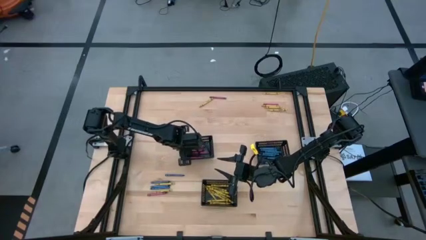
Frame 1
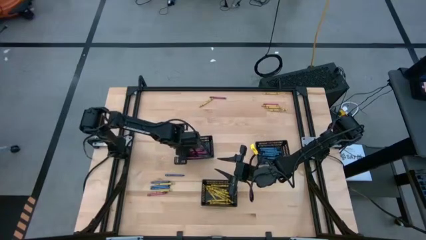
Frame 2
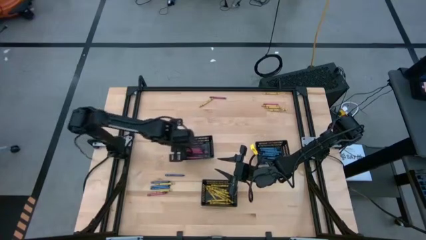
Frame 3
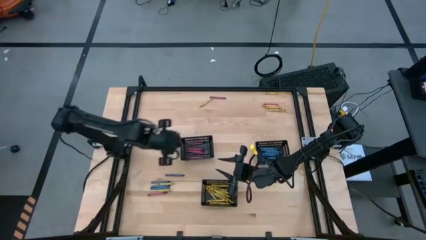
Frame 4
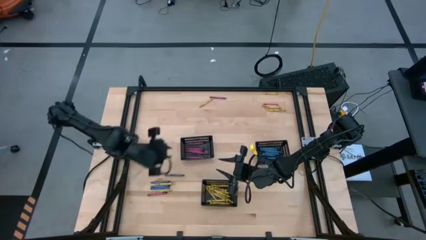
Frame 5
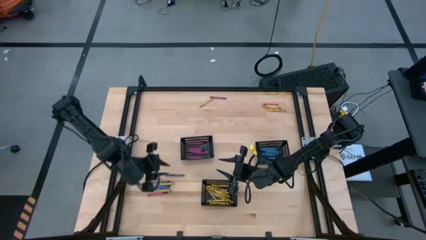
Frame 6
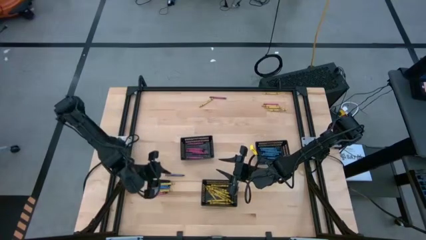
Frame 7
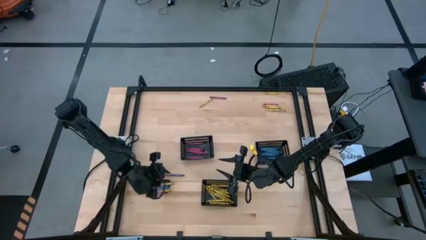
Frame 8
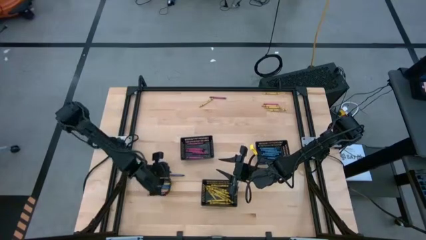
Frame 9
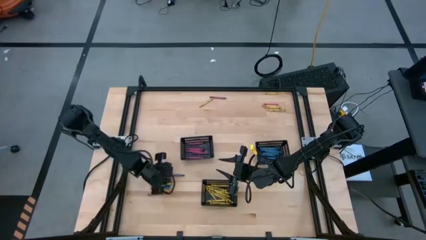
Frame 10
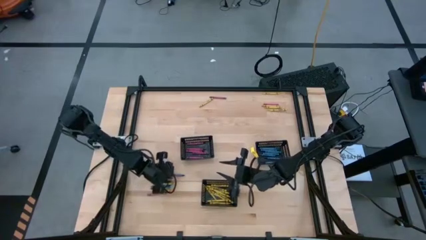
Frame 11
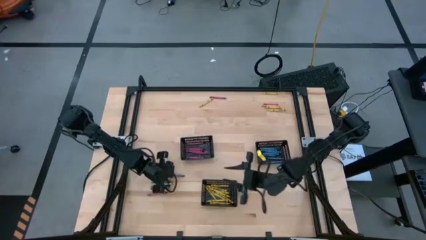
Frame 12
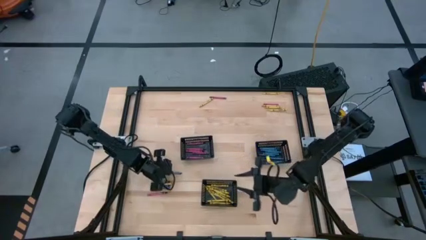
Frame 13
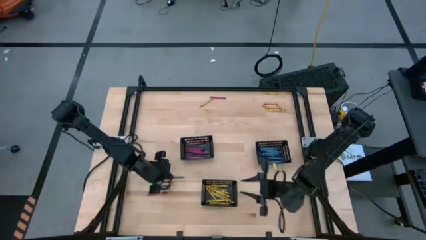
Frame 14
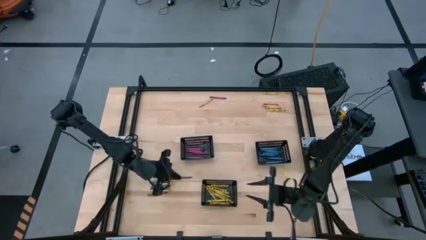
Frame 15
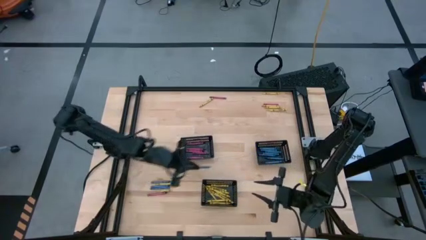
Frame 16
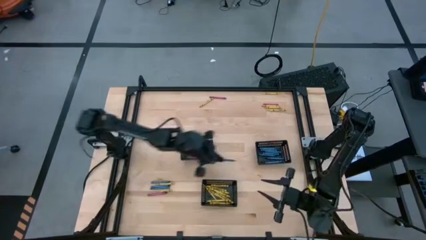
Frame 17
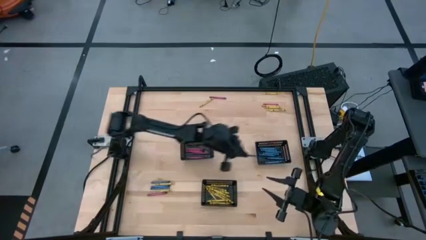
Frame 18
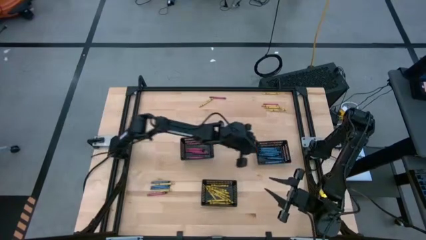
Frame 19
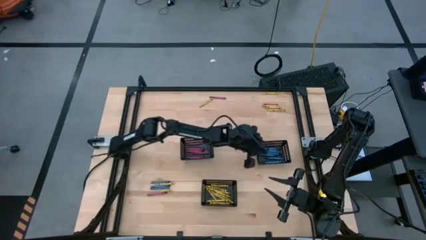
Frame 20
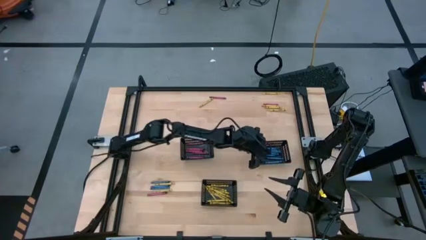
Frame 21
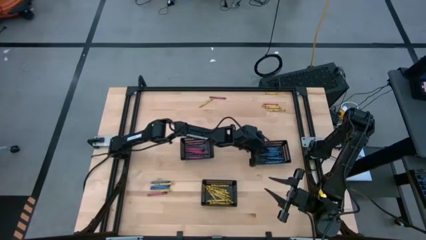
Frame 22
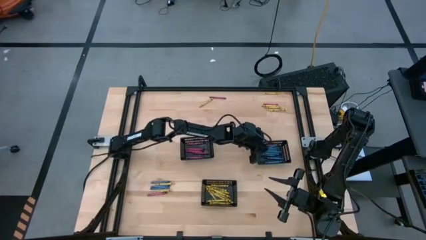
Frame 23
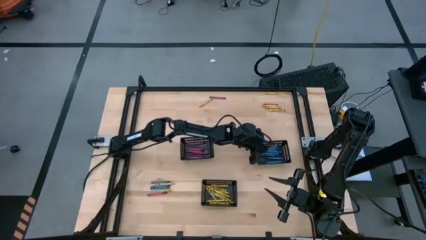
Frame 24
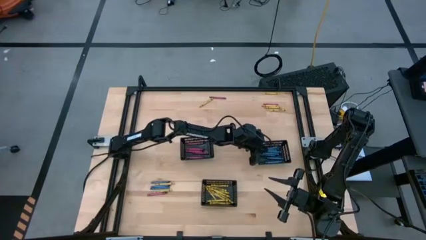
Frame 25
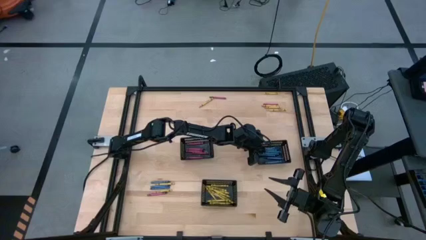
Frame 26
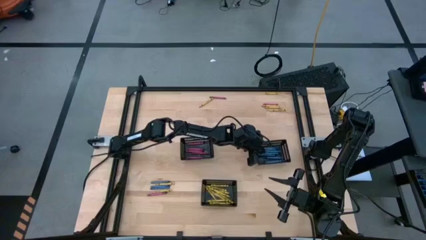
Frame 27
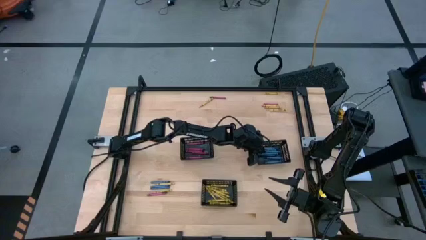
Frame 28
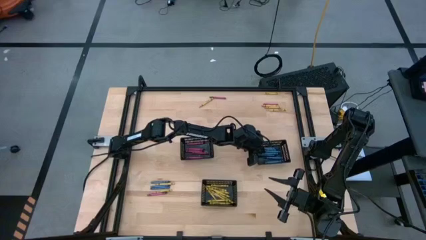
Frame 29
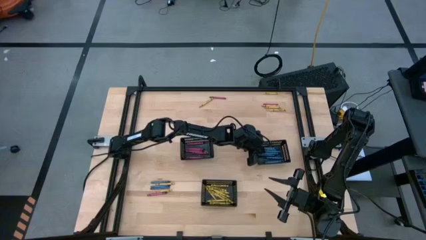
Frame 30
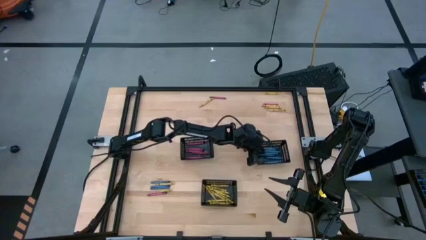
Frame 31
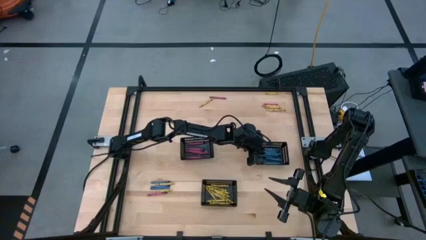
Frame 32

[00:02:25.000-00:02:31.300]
Task: Sort crayons
Put the blue crayon into the right black bin

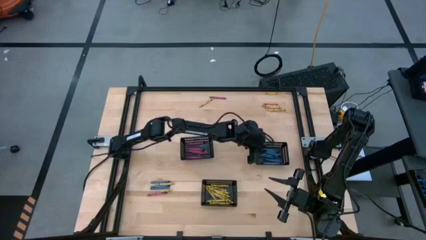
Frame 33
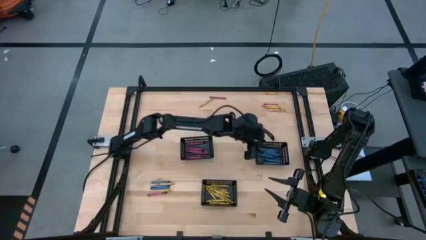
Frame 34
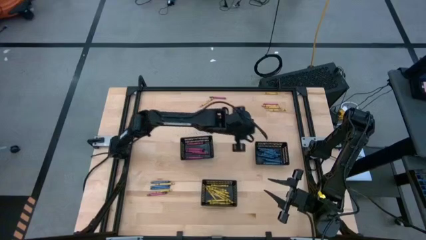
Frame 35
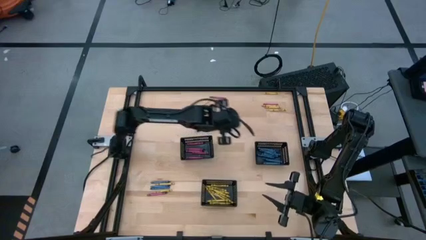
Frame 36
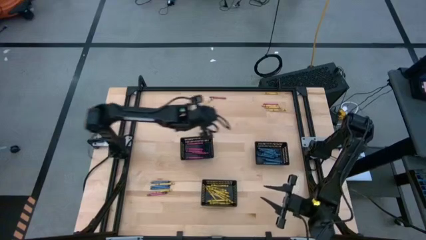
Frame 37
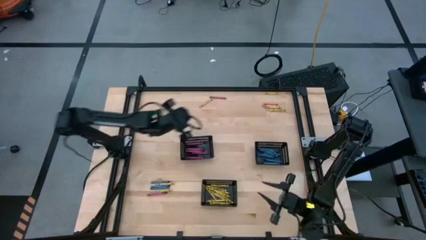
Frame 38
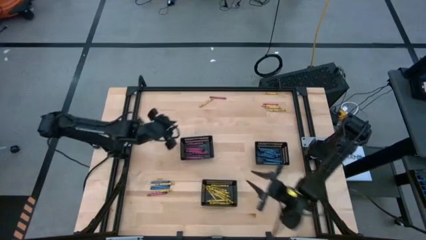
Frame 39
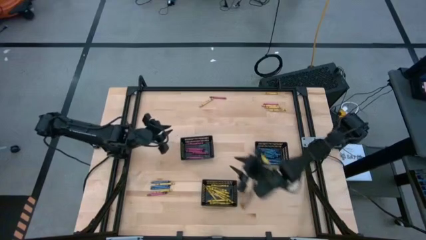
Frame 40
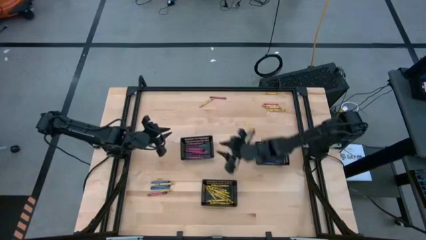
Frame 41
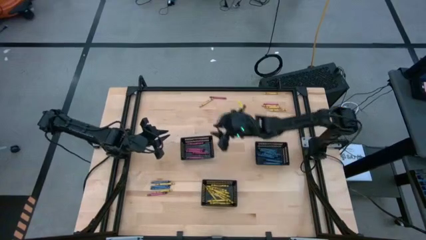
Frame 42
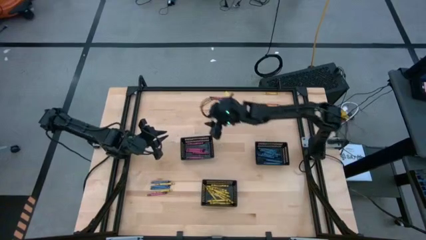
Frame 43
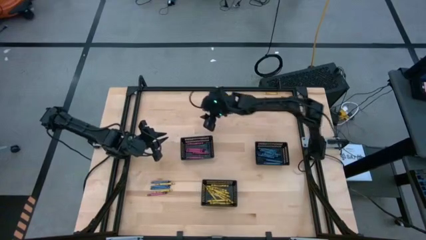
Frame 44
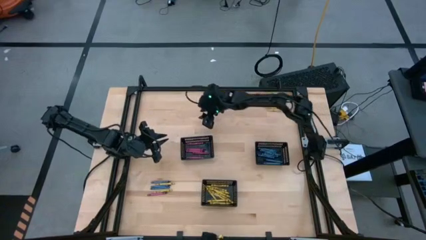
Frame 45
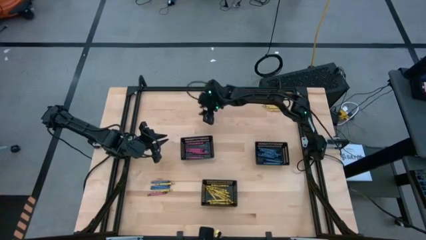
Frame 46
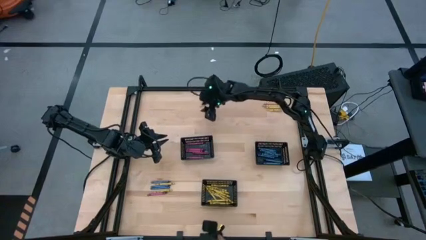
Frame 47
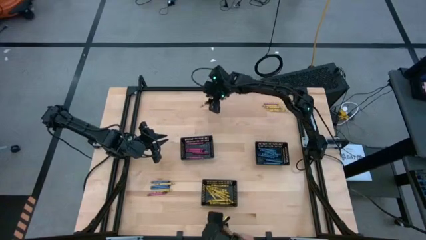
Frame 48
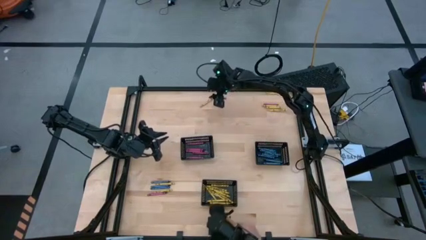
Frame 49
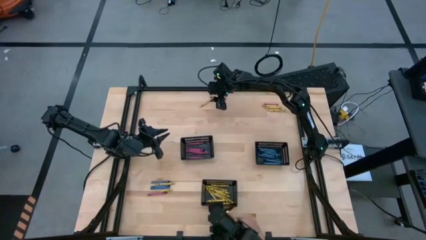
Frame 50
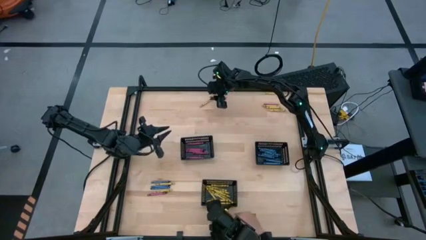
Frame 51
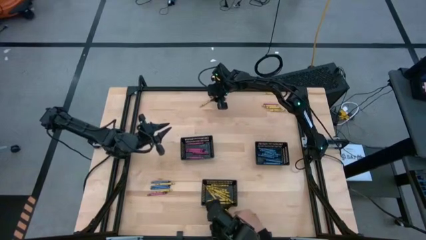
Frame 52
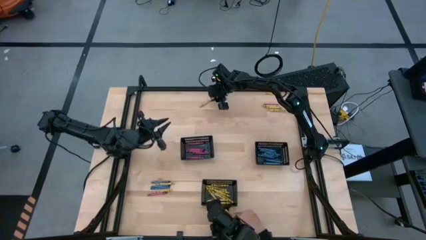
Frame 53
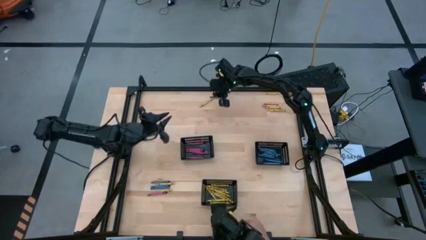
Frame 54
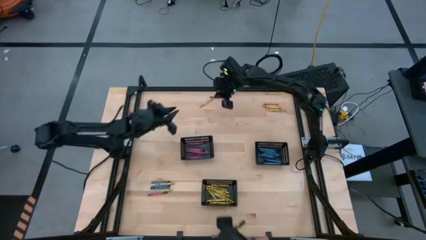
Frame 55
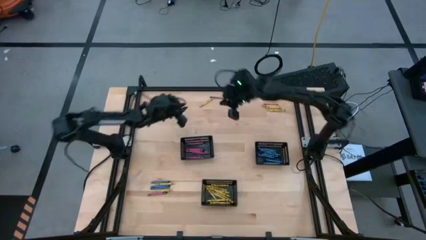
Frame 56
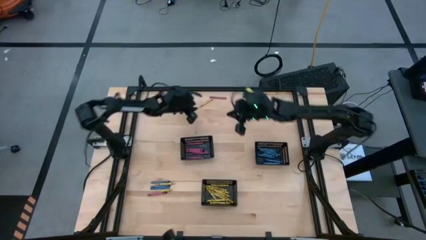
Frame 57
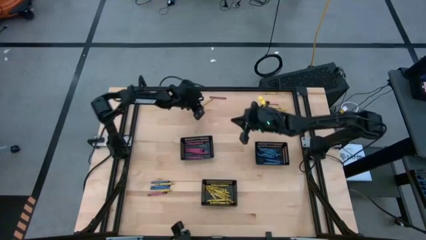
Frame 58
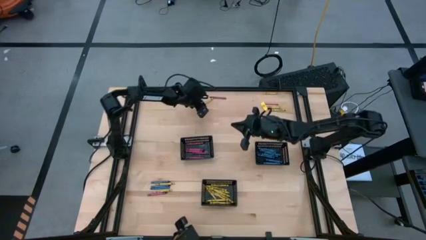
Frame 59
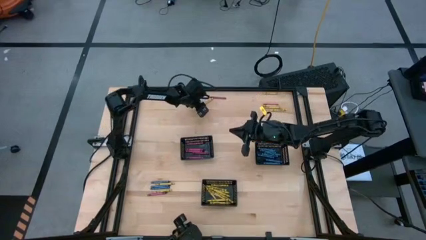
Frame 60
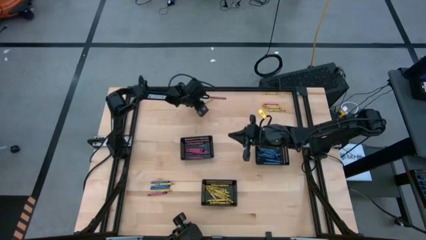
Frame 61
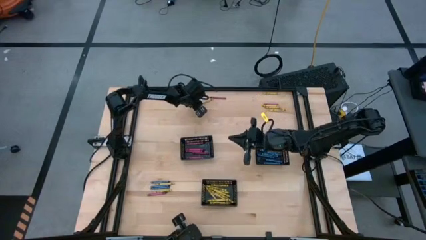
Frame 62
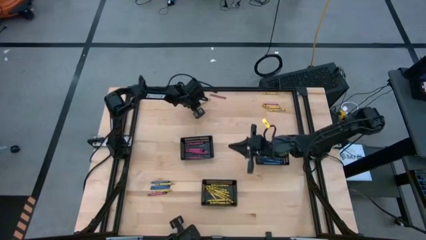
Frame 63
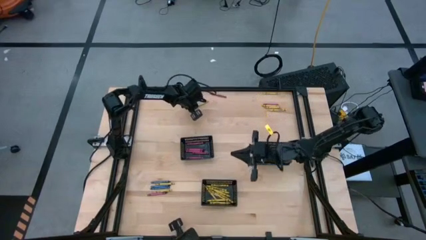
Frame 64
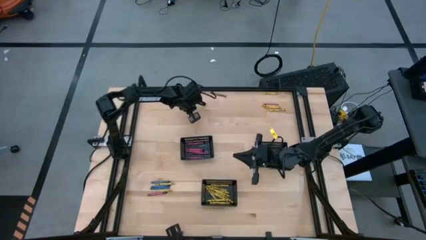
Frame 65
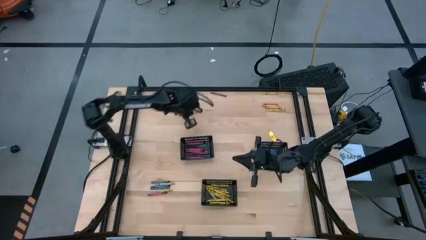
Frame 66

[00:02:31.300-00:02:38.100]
Put the yellow crayon into the bottom black bin

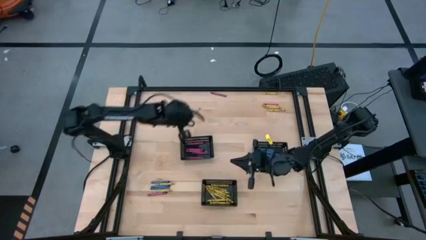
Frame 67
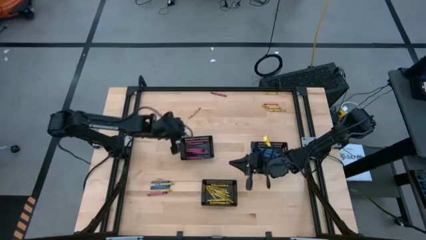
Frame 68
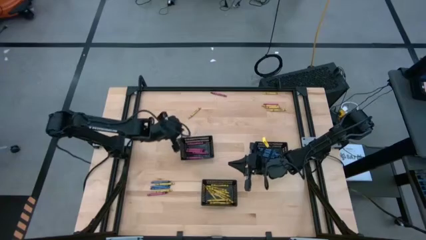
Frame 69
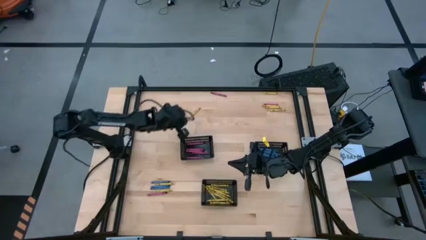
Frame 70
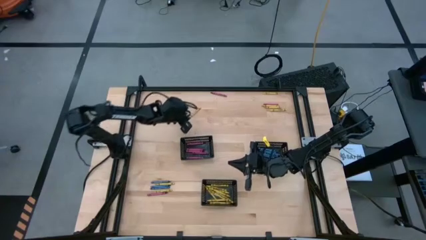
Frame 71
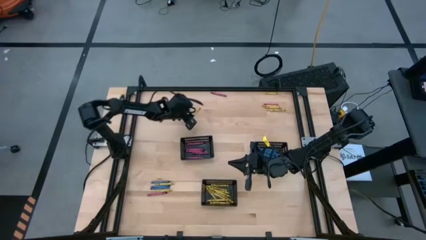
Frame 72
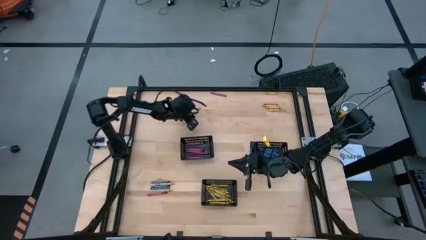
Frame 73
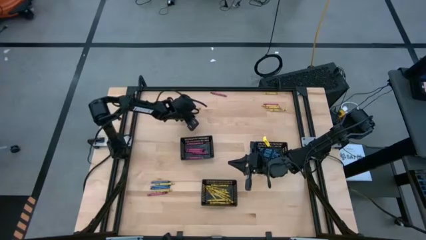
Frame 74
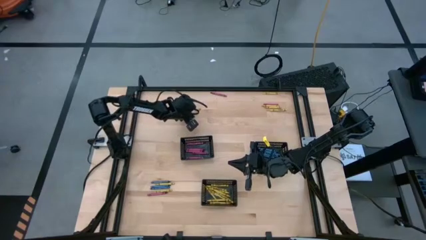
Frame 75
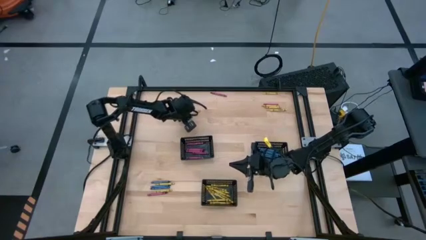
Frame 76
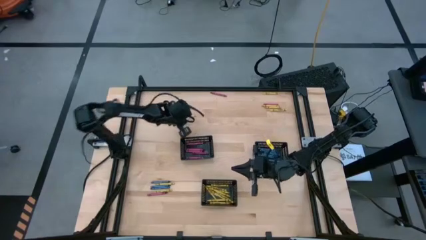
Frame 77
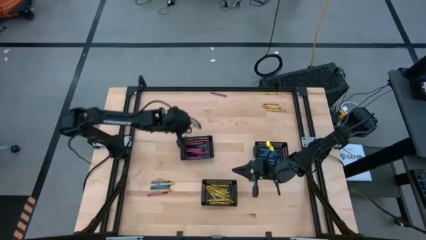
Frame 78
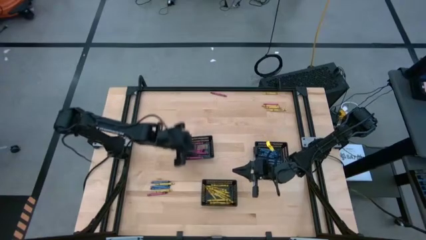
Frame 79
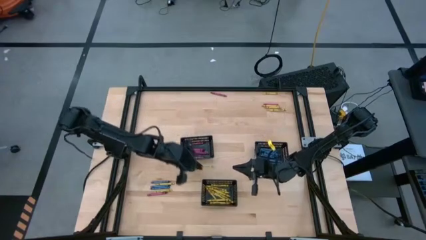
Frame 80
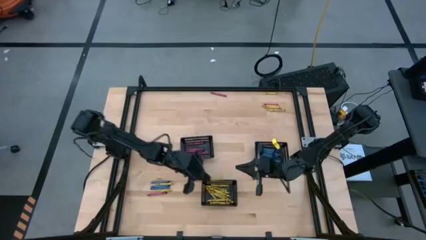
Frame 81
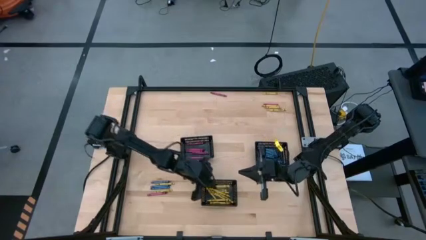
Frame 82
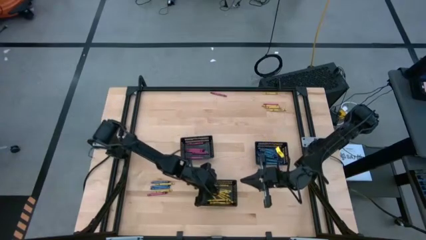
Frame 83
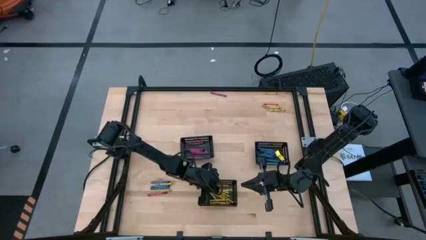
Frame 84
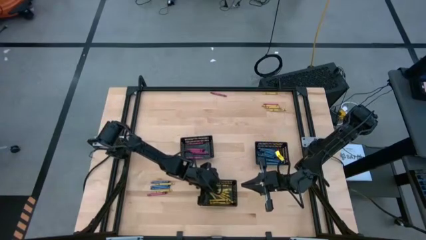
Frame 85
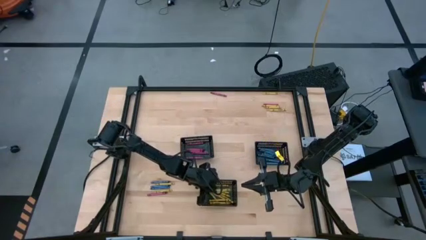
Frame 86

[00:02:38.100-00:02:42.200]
Put the yellow crayon into the bottom black bin
